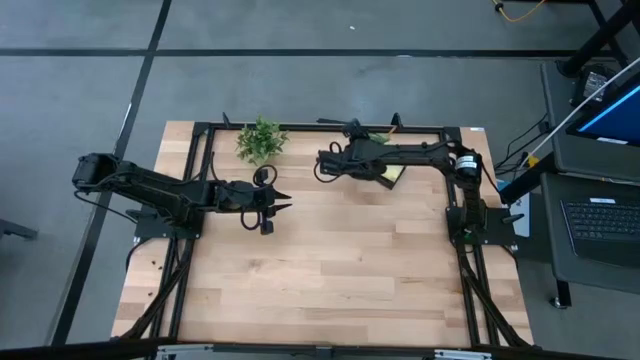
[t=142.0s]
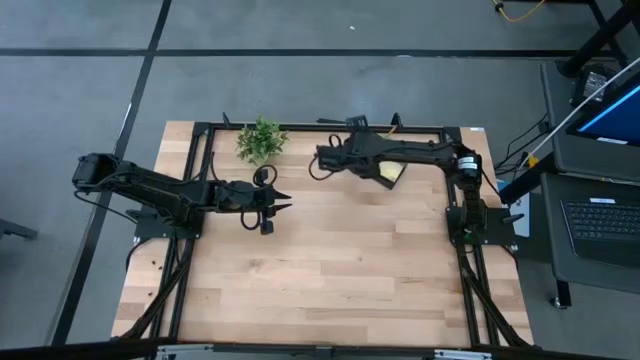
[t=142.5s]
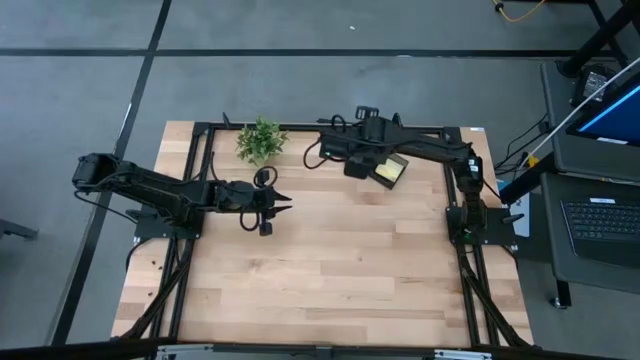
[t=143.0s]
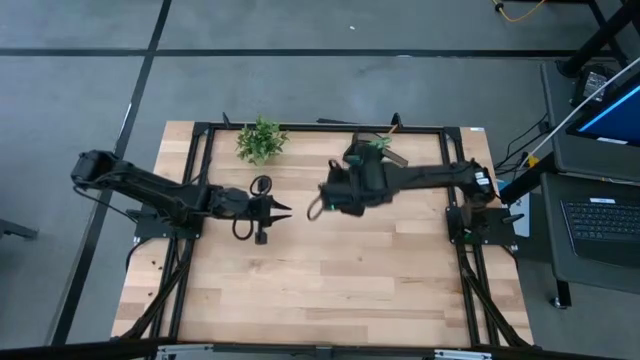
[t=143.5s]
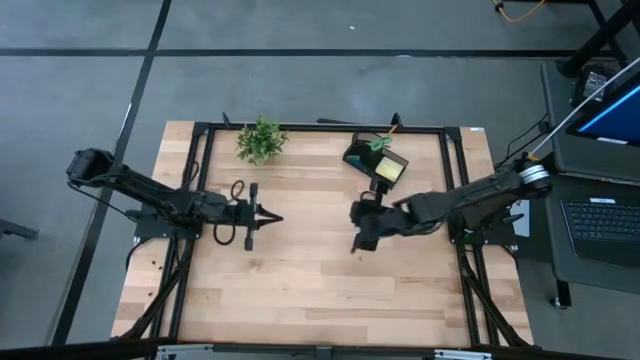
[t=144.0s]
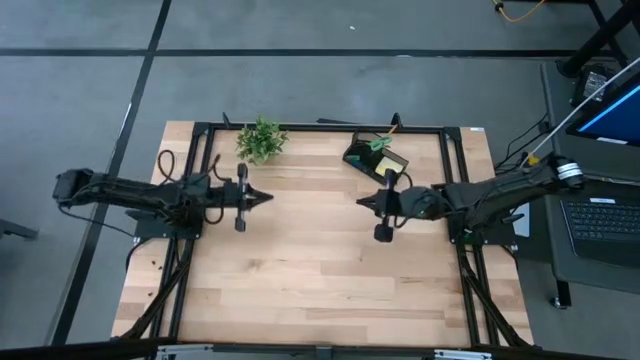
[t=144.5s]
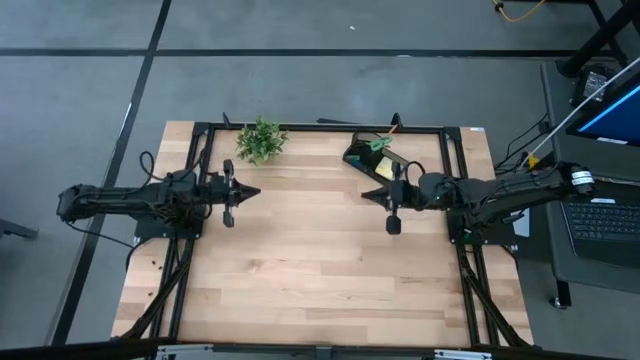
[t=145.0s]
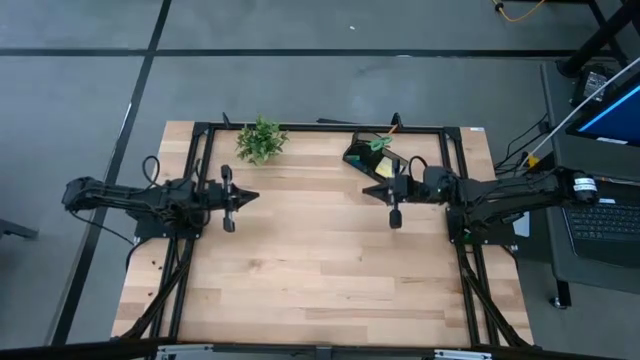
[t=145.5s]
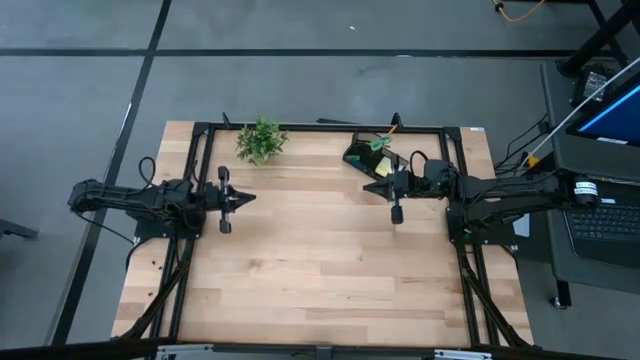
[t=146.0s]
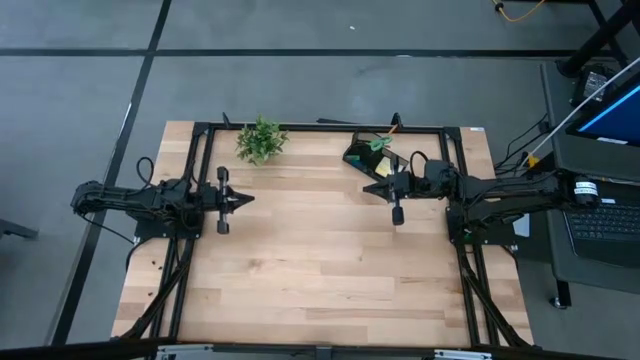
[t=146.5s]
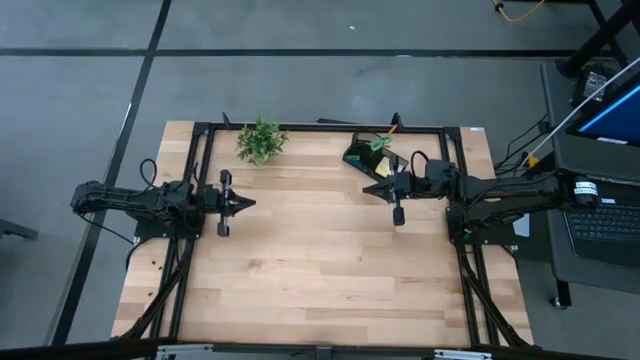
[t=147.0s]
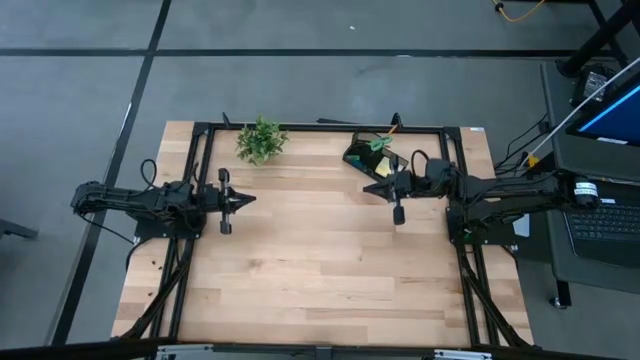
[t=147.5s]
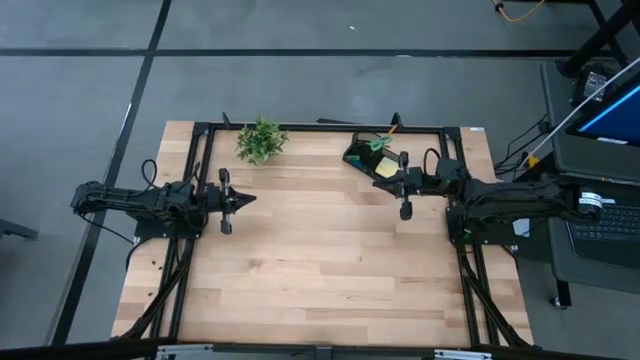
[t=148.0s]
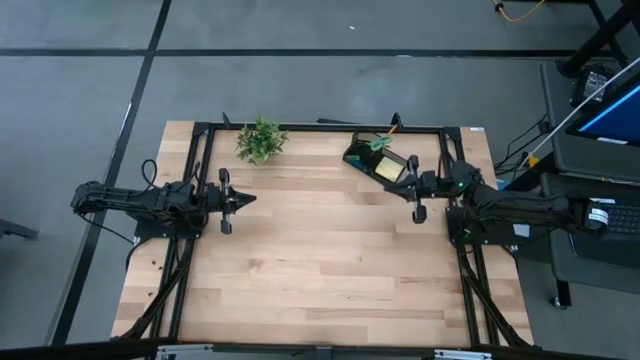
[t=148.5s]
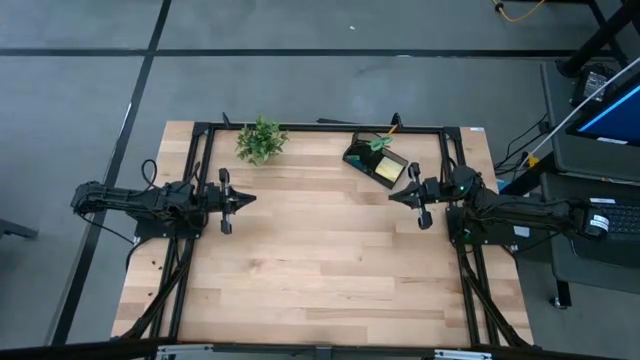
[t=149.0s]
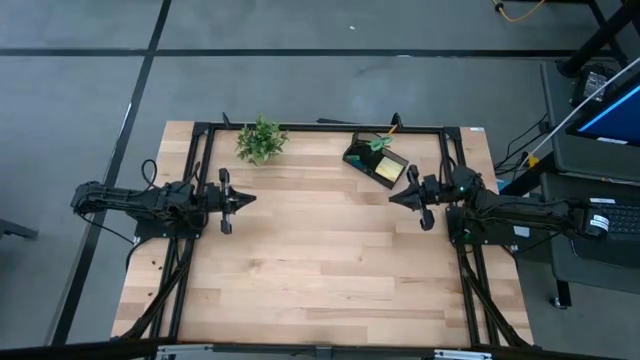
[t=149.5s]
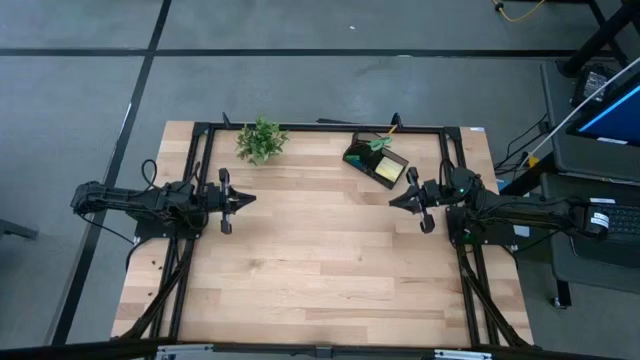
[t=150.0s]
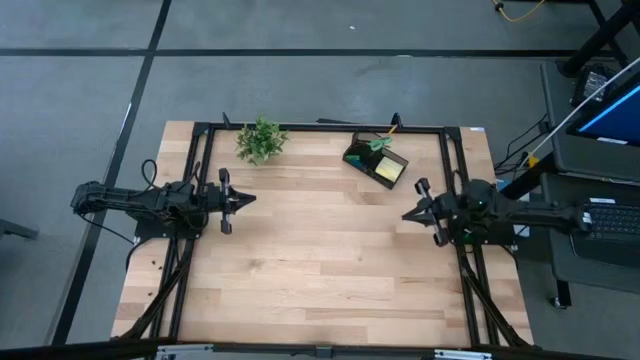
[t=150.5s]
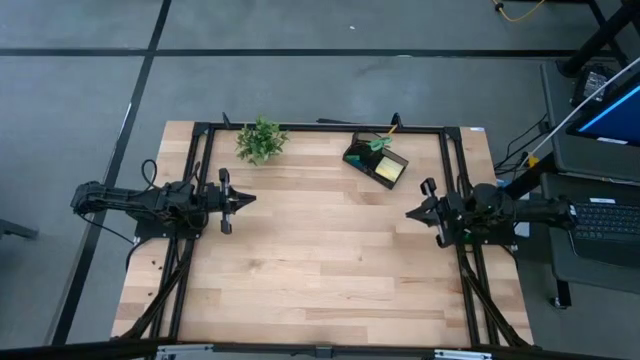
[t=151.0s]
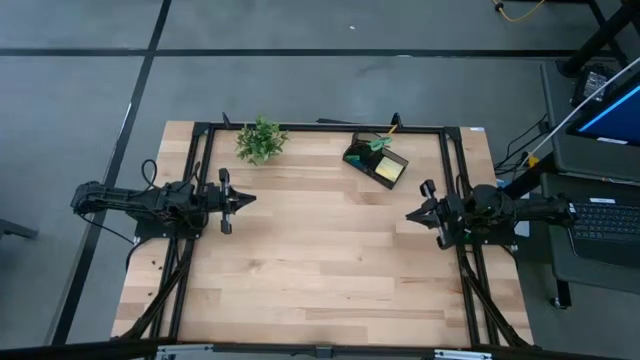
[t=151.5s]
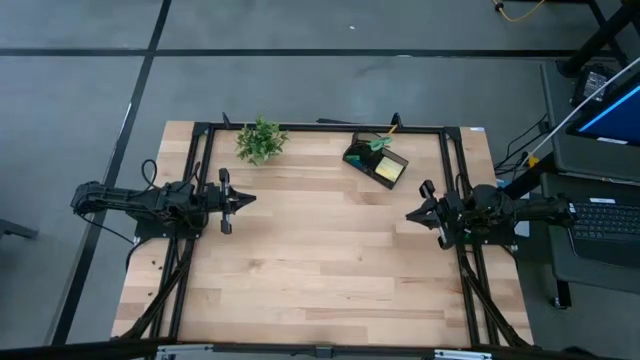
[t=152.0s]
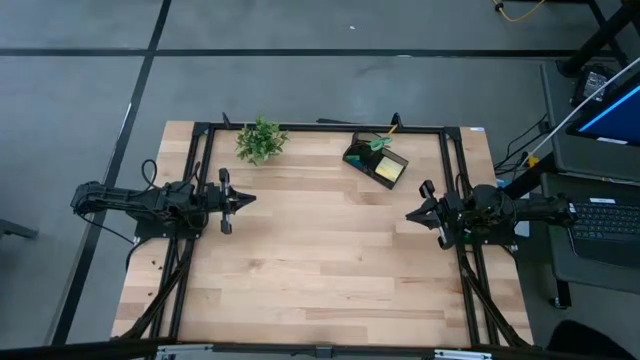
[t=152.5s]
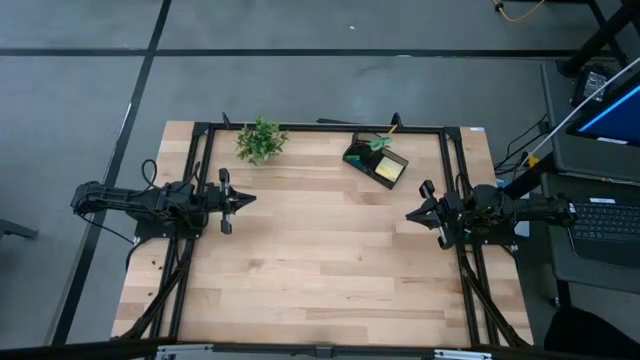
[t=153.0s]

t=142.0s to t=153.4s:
Task: Pick and place office supplies into organizer
Return to Home Position

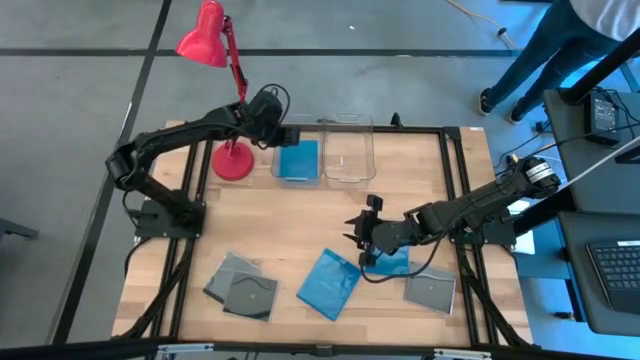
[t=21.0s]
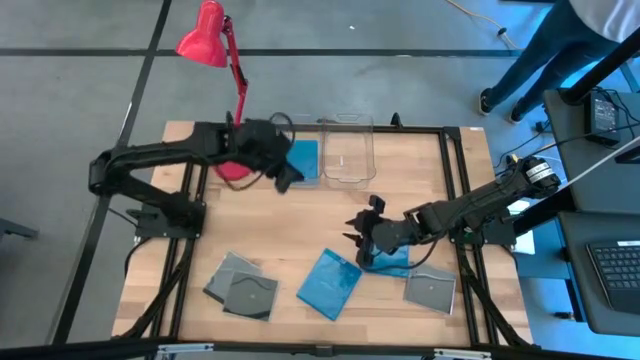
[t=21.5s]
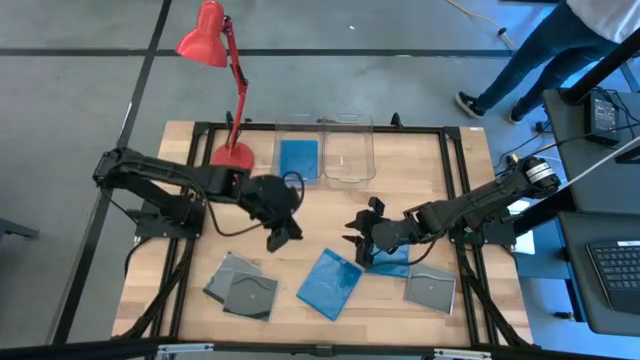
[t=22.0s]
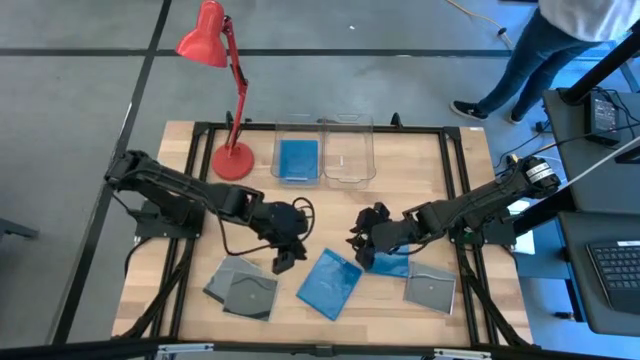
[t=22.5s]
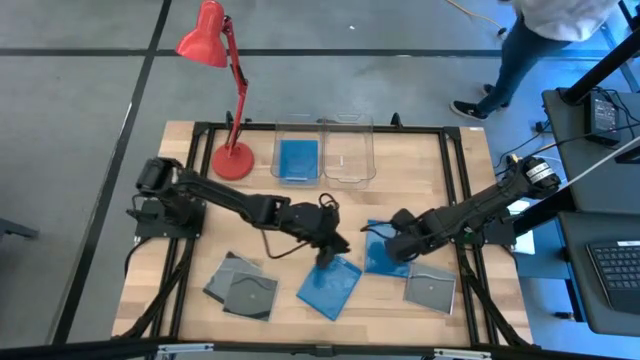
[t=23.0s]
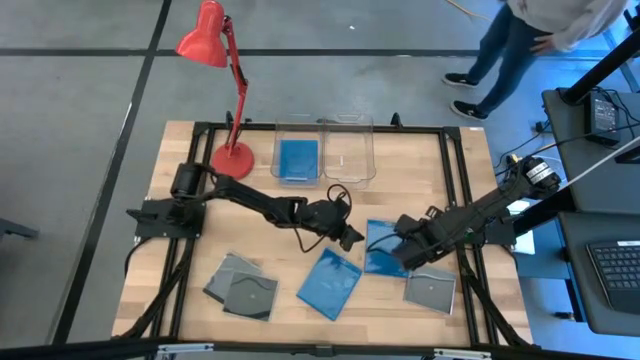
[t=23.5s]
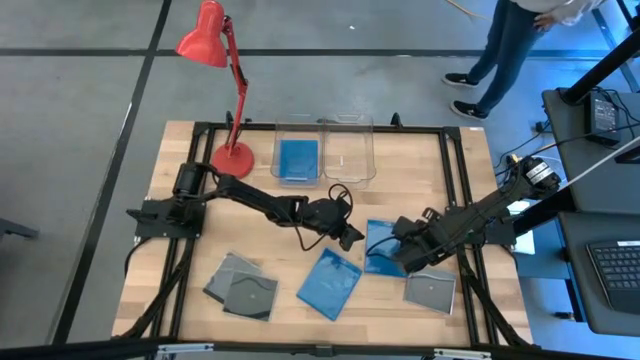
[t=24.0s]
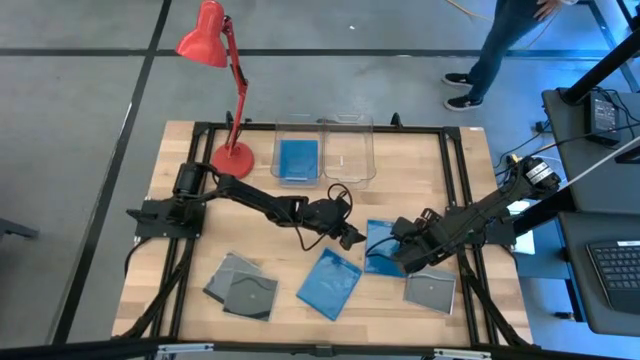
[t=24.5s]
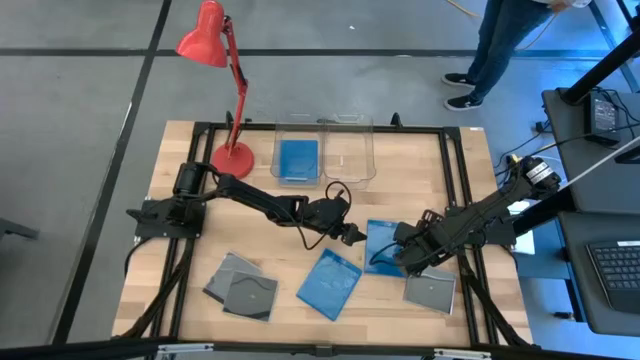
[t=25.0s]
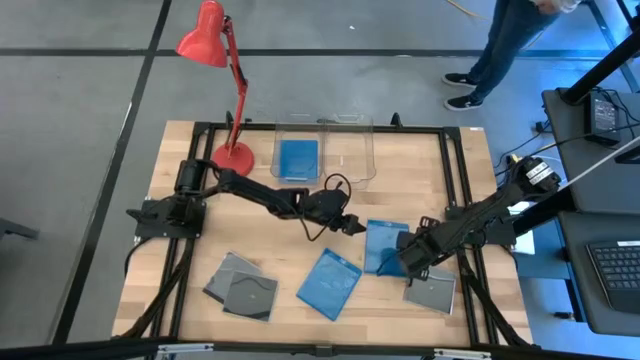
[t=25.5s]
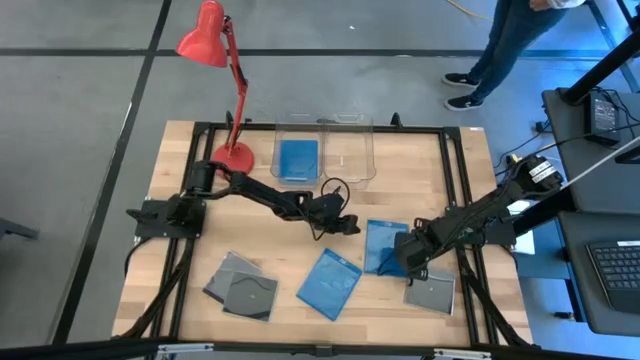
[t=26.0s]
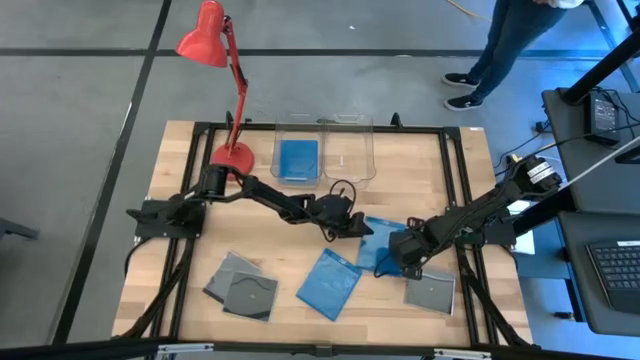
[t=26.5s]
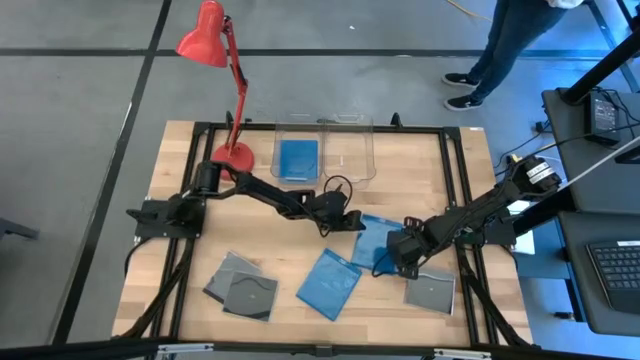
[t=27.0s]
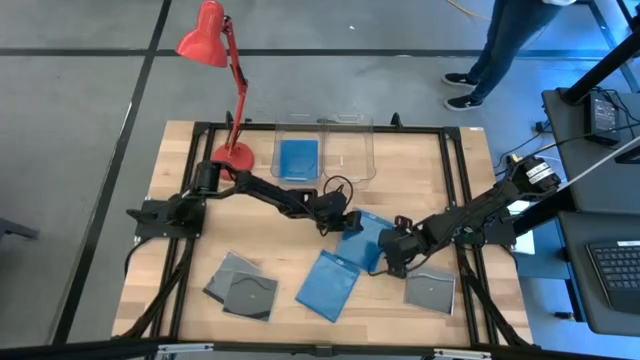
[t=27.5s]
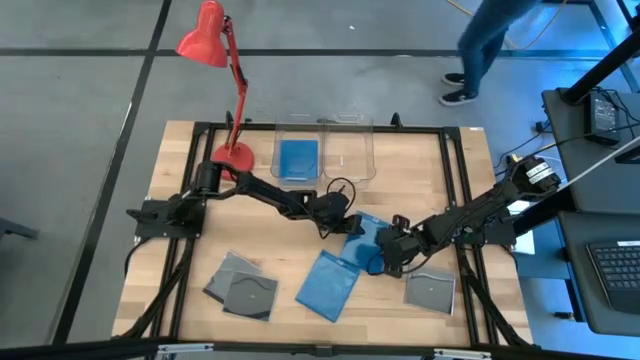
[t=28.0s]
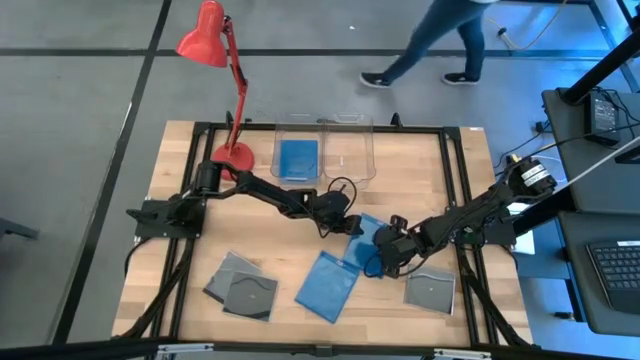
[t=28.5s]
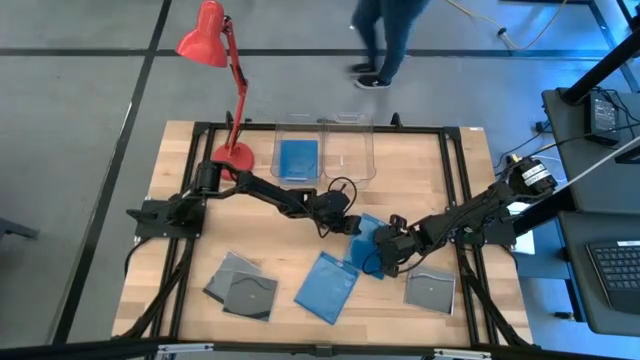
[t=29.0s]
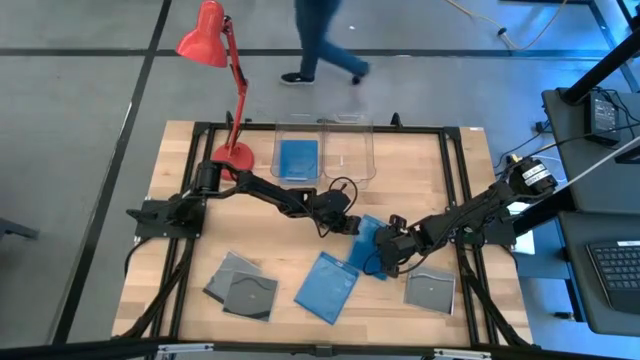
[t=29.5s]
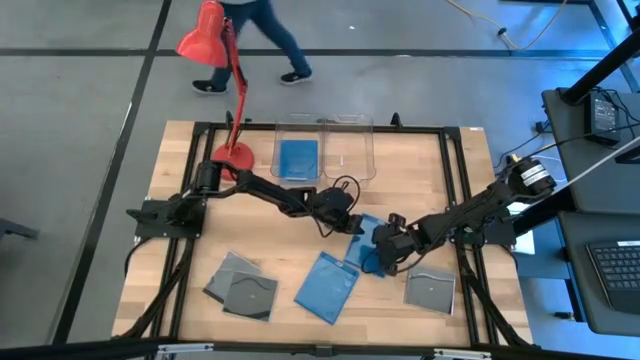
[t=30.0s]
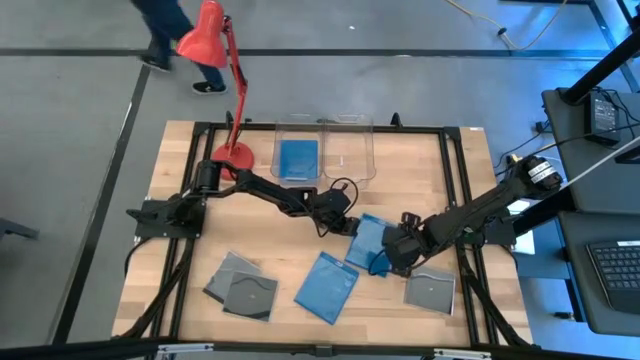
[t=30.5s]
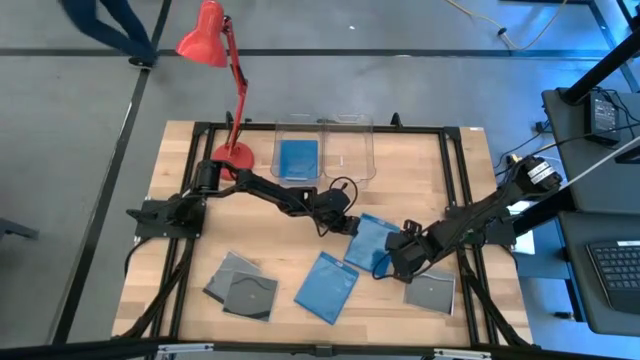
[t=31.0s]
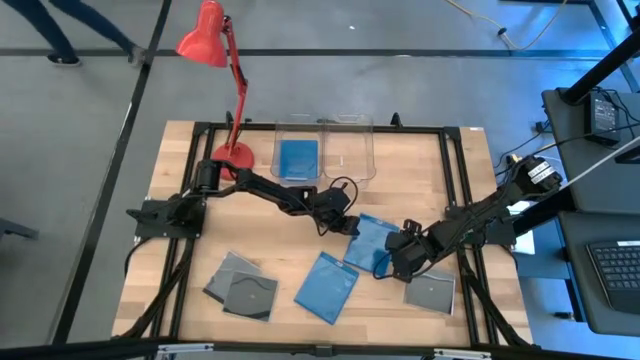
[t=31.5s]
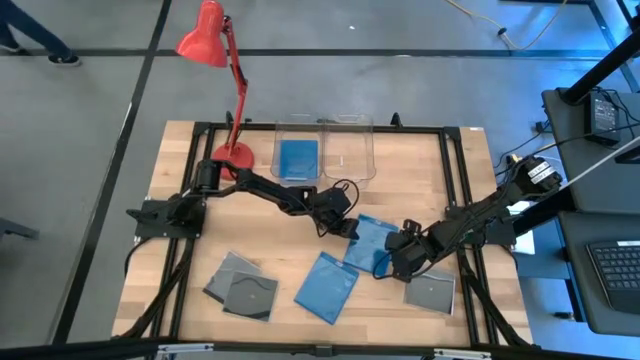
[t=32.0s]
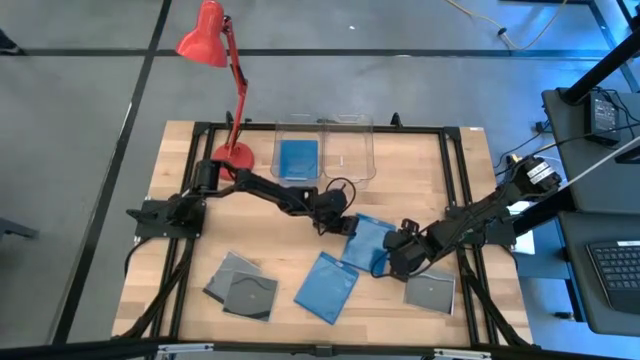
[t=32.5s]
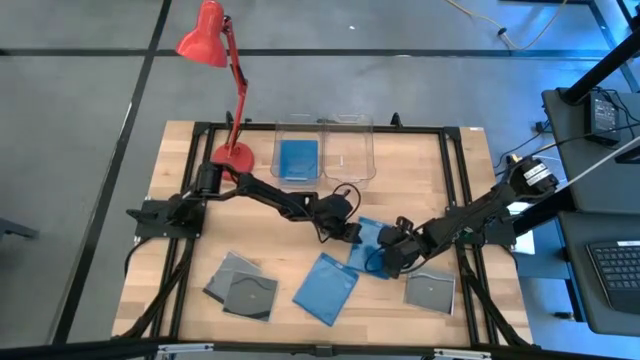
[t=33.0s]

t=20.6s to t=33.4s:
Task: Pick & place jewel cases by type
Put the right blue CD case into the left transparent bin
